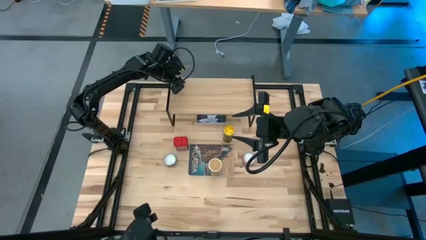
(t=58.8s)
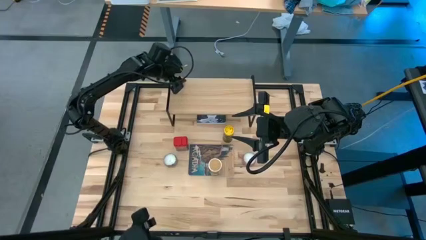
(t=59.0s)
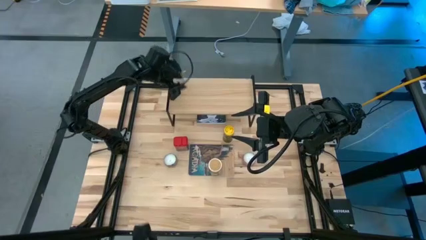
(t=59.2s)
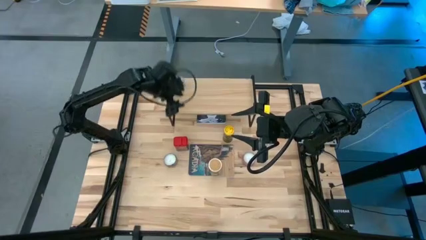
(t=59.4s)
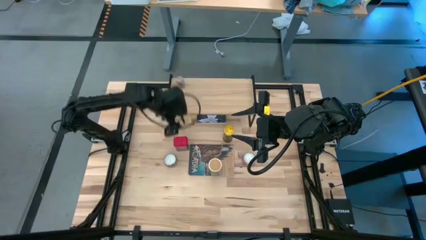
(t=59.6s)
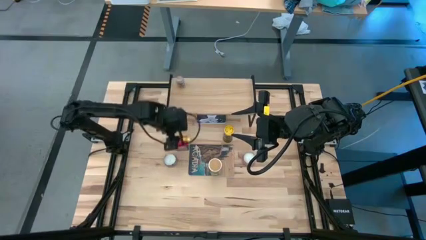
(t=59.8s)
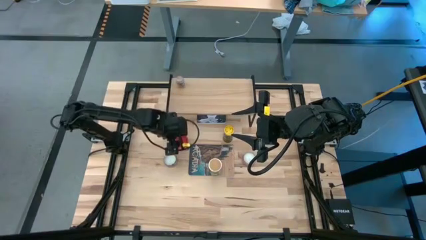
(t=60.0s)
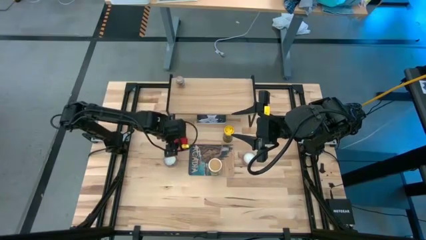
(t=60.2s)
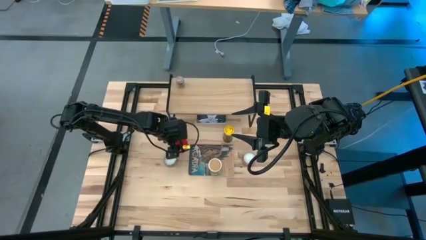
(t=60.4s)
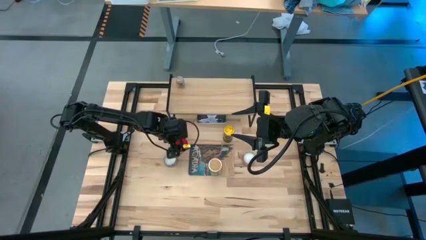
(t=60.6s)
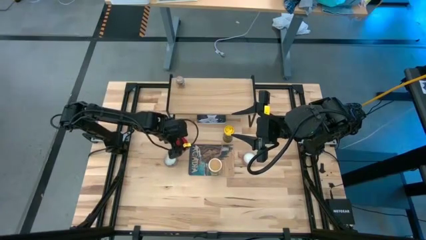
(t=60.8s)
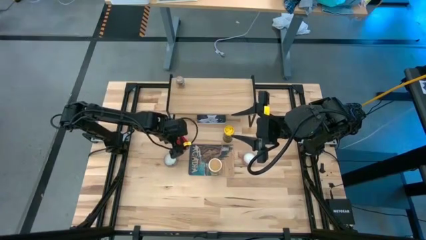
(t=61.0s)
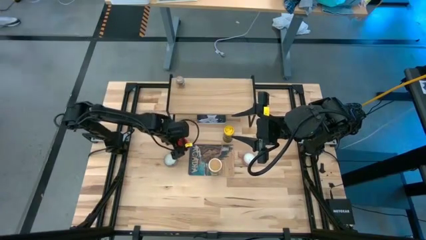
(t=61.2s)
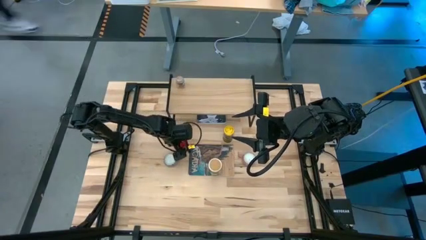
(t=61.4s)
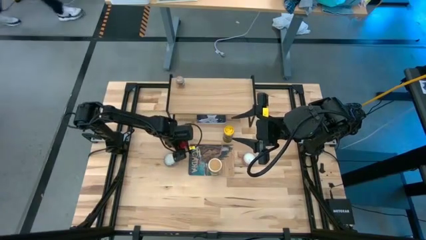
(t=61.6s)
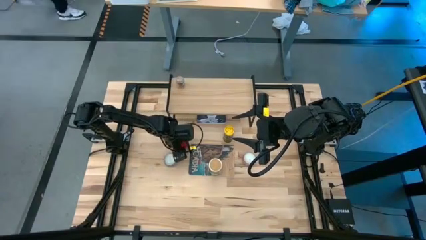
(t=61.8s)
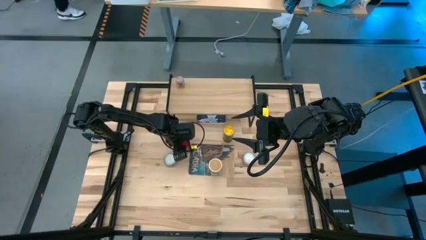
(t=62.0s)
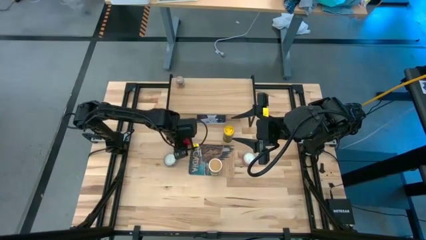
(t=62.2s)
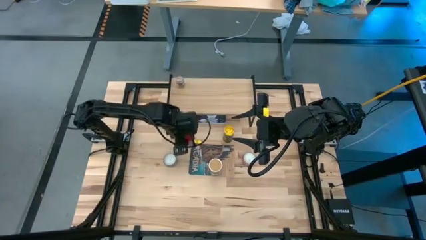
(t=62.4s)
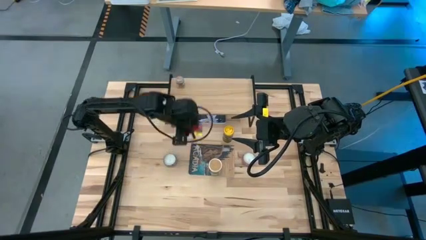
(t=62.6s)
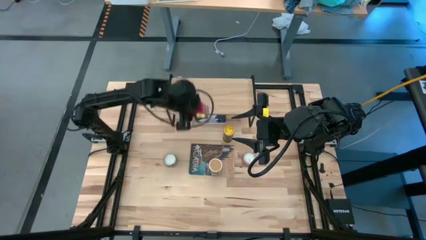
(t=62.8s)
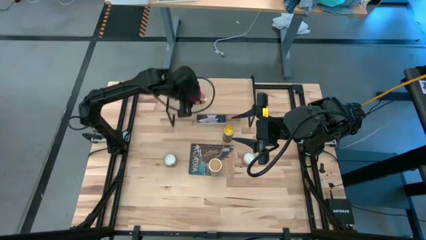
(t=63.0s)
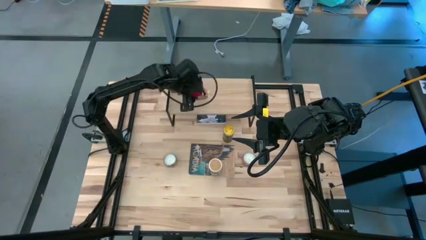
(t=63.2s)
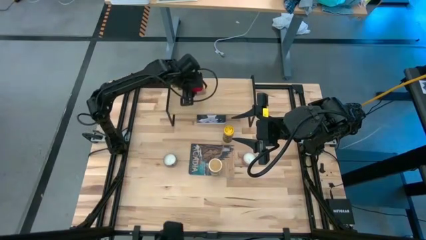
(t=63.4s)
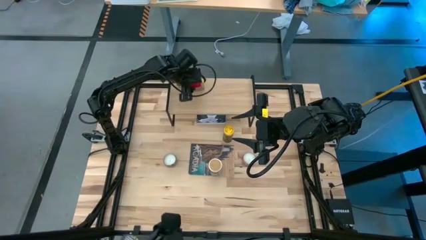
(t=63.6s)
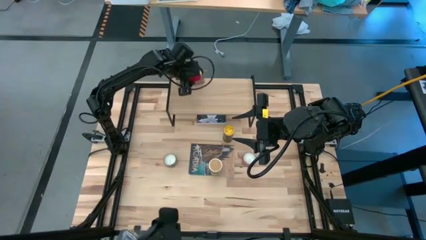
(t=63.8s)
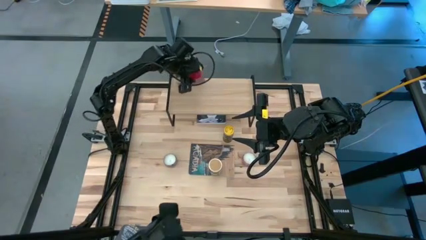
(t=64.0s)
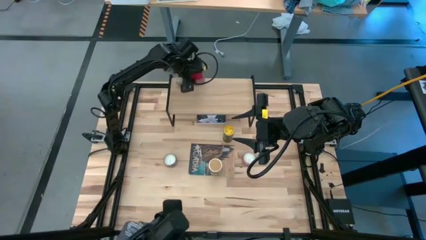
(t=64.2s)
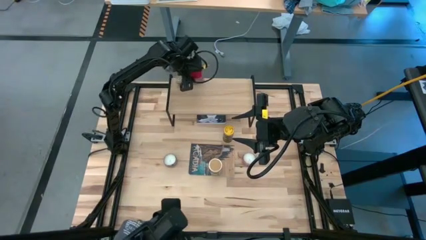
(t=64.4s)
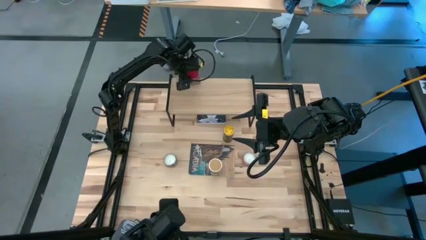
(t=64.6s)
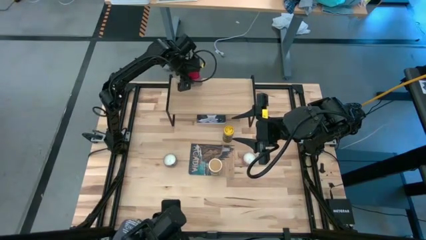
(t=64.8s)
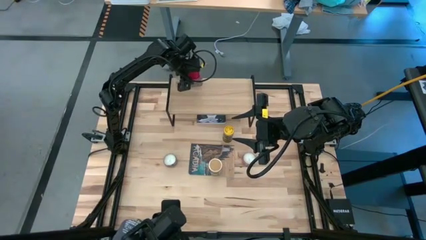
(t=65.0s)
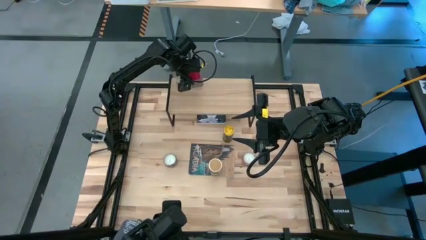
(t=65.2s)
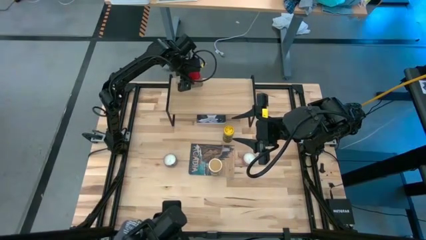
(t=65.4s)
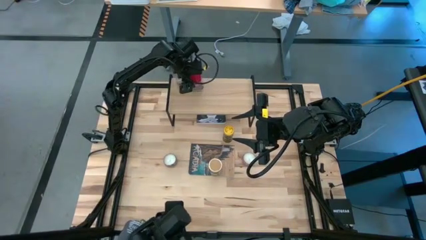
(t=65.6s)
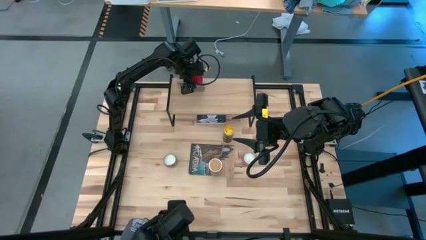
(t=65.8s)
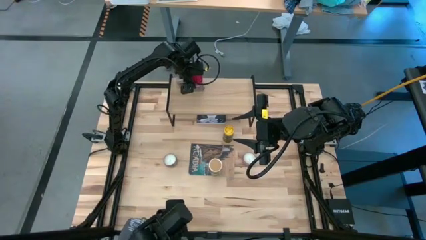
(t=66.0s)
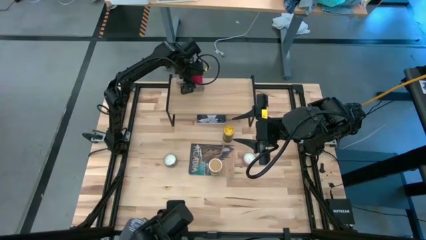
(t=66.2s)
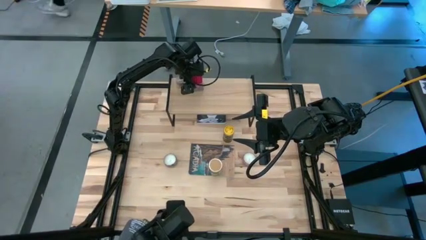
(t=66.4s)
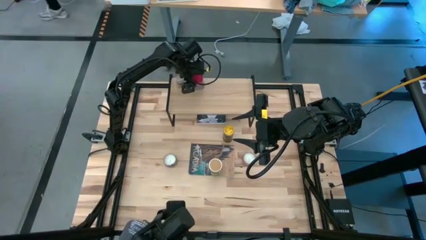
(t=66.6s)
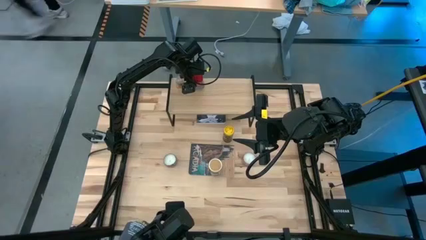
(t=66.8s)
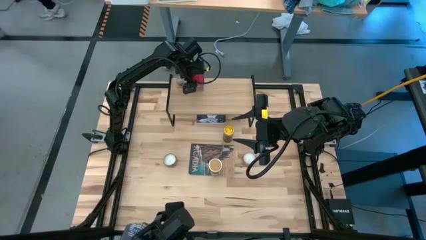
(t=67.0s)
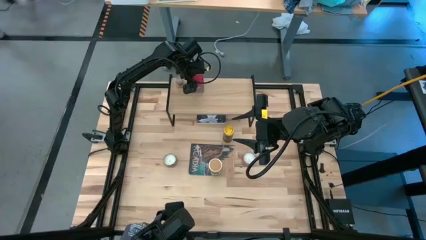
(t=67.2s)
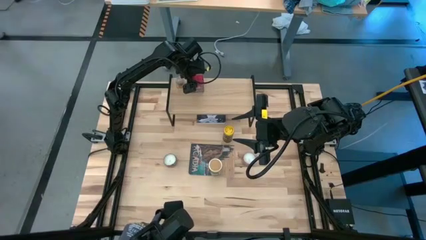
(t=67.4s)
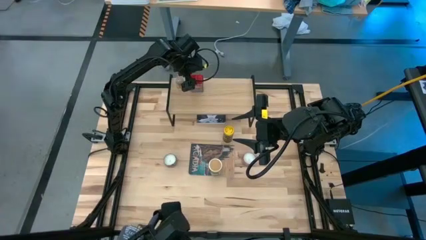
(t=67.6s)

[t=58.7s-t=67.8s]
Task: Shelf spices
Put the red seasoning can on the shelf

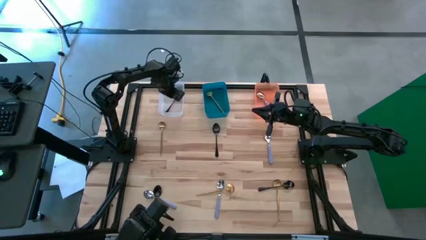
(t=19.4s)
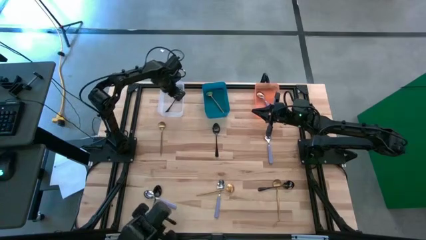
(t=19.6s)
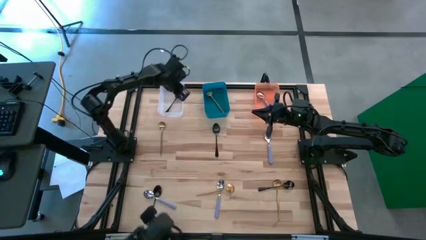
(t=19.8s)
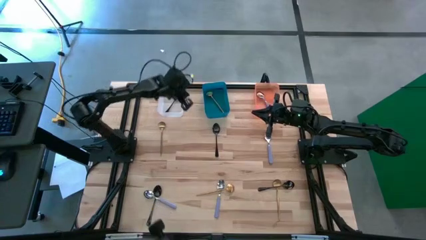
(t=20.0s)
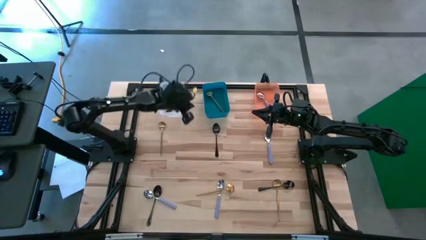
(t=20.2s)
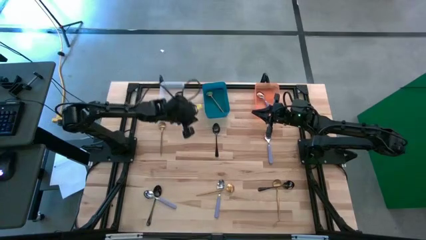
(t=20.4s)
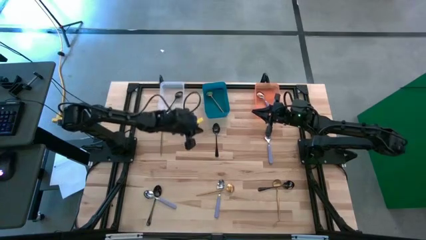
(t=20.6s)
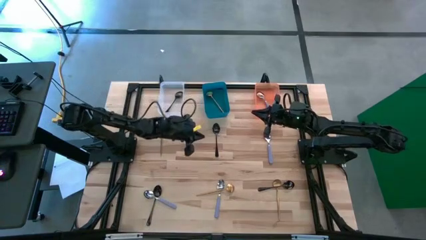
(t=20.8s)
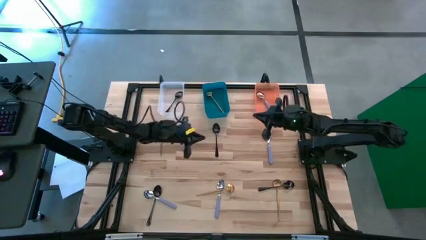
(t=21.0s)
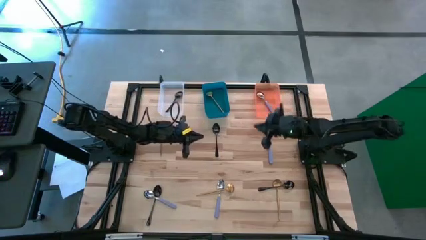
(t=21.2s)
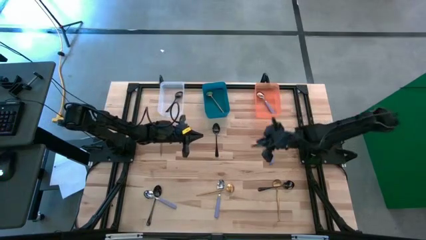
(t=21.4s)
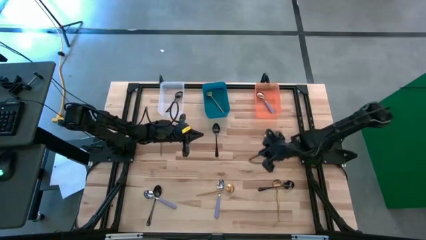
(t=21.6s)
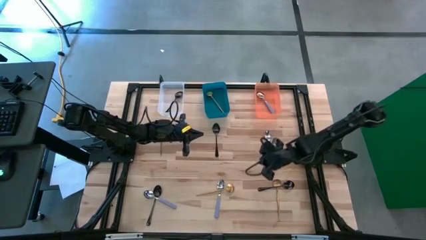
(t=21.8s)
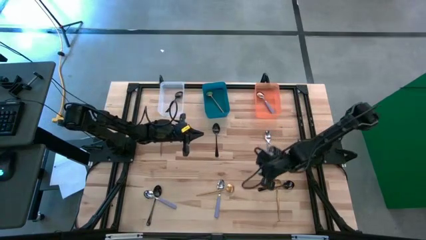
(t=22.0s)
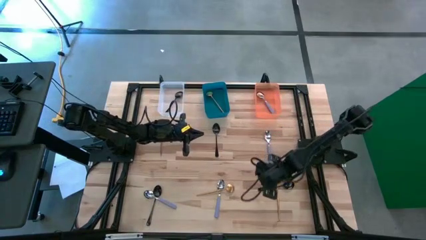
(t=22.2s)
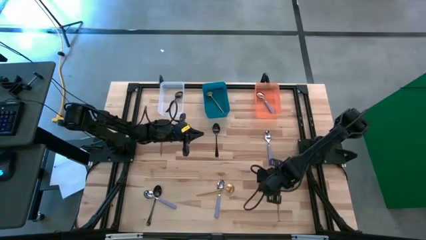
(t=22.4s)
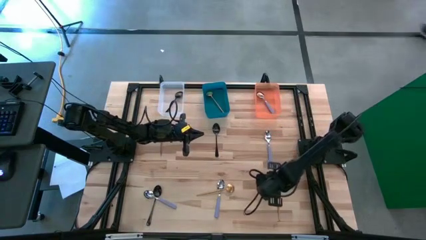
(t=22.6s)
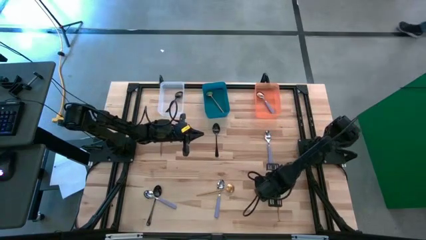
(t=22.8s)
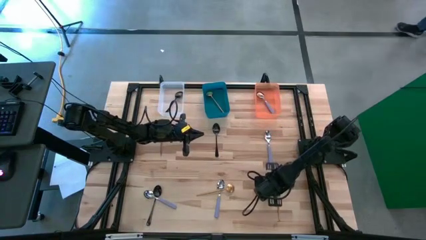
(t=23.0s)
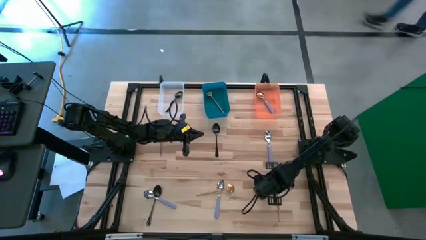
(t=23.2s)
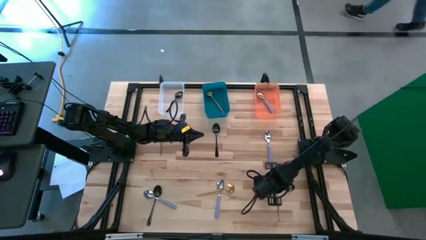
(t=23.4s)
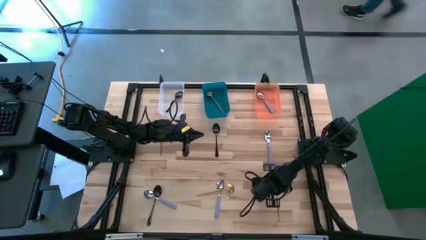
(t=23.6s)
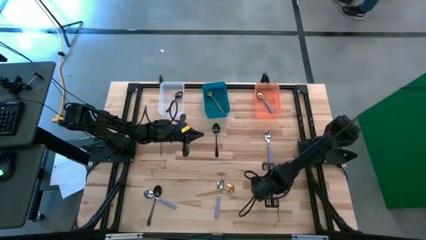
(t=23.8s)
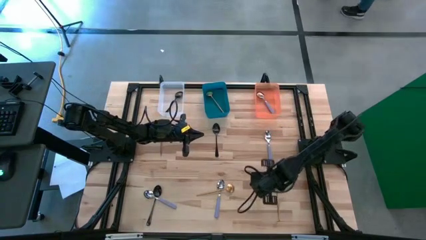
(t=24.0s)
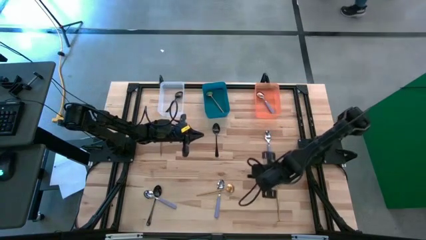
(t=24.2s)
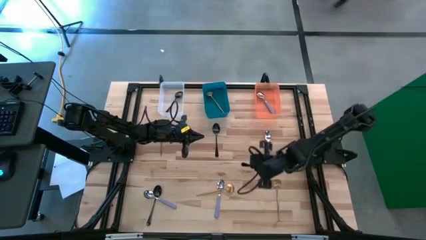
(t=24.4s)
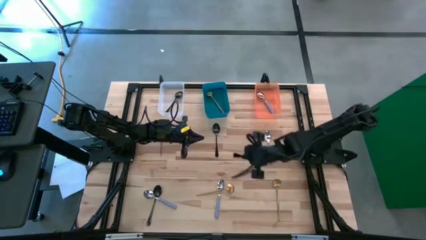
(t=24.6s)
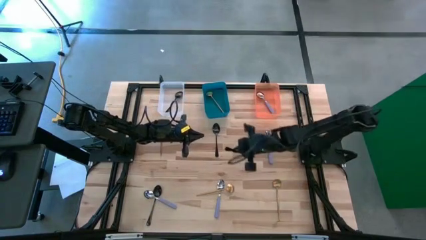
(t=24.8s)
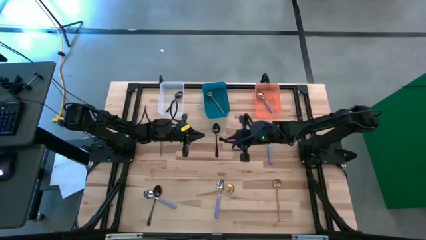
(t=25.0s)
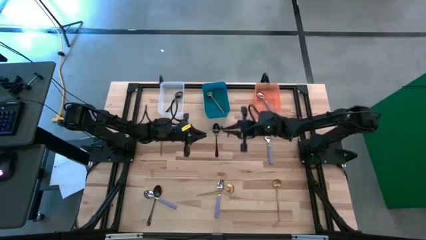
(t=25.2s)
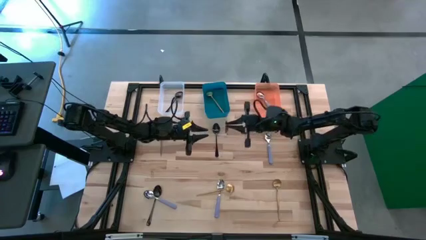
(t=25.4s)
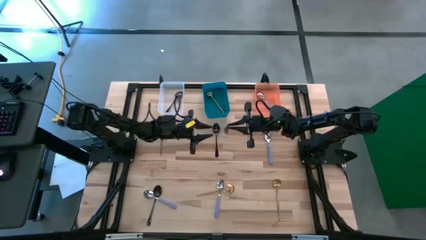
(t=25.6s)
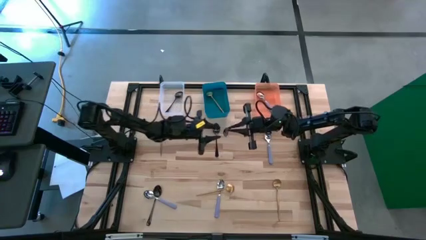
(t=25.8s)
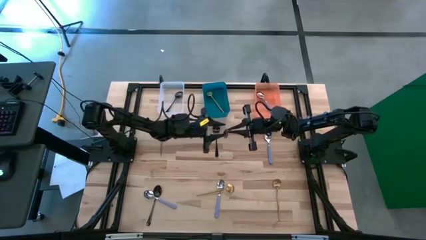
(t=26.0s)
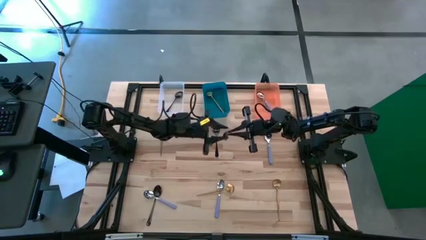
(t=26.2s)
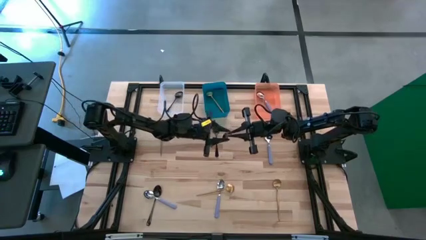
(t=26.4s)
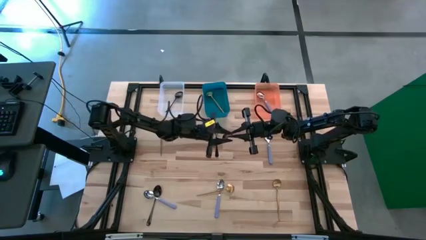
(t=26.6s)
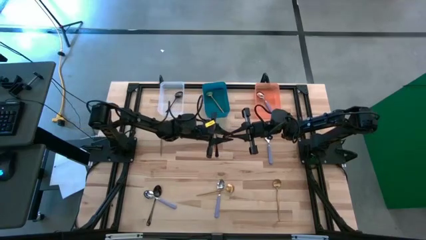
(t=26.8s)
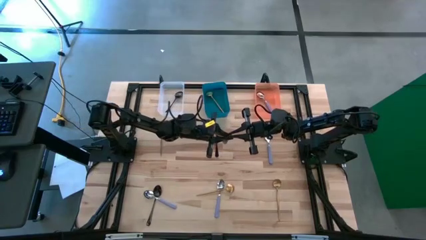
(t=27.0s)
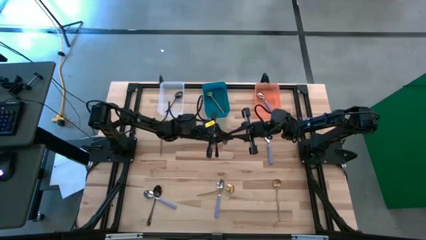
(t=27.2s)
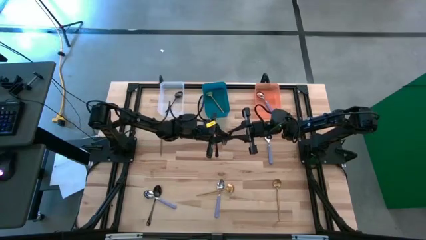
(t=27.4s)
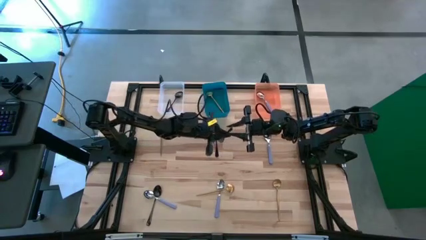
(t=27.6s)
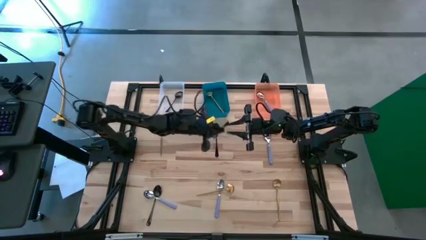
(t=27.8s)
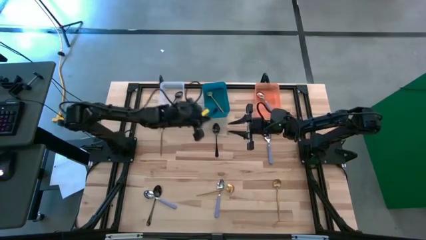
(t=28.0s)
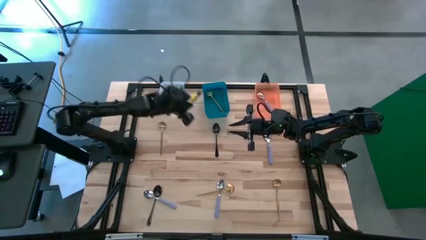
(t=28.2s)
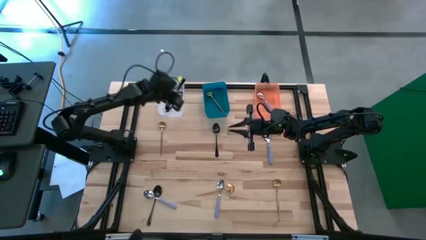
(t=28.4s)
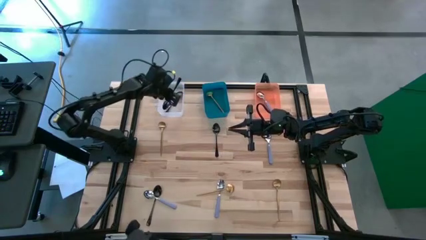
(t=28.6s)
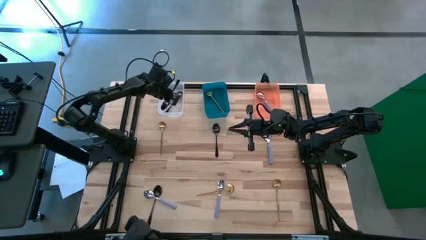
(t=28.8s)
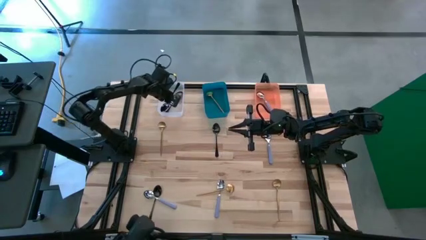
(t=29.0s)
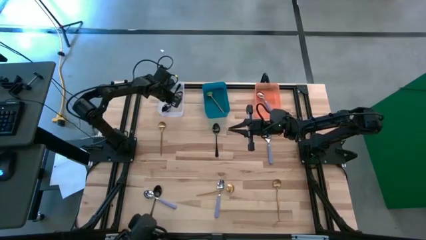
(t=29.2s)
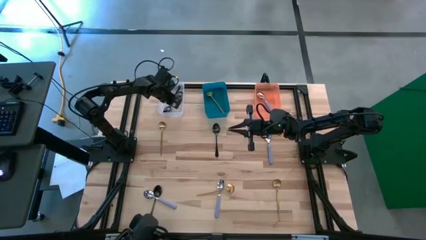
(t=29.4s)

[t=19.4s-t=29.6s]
Task: Sort silverware by color (type)
Put the bottom right black spoon into the transparent bin
